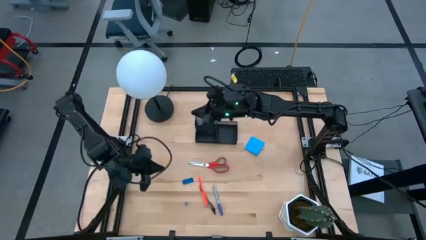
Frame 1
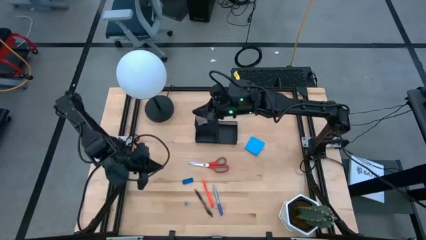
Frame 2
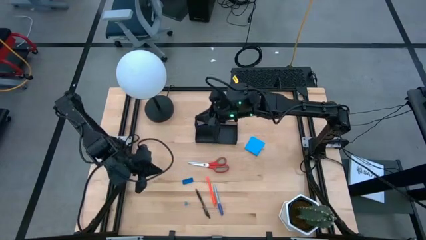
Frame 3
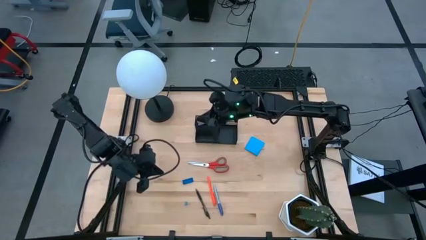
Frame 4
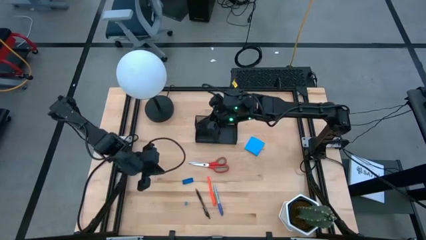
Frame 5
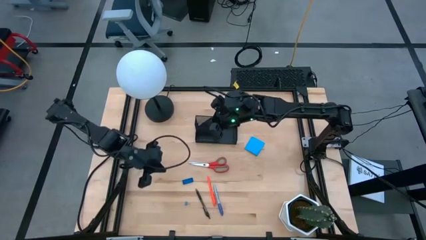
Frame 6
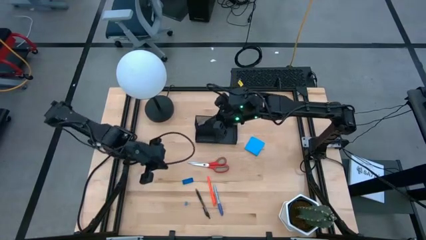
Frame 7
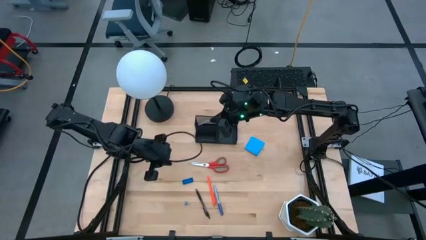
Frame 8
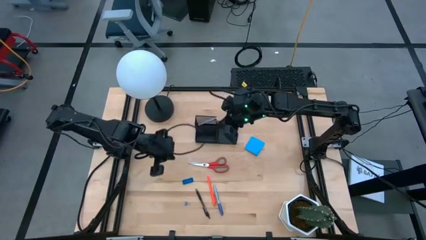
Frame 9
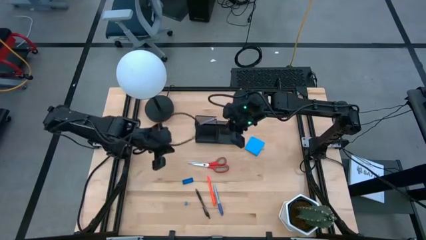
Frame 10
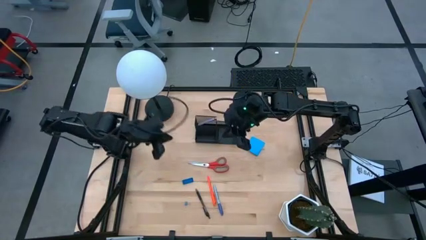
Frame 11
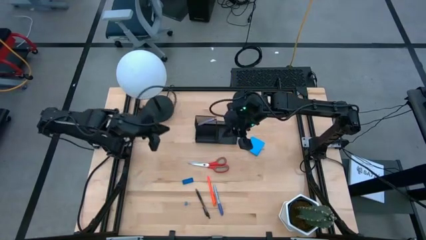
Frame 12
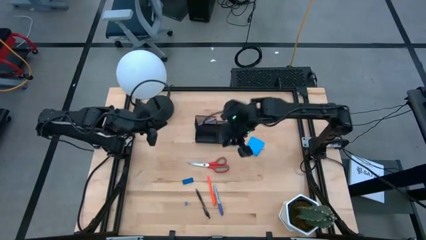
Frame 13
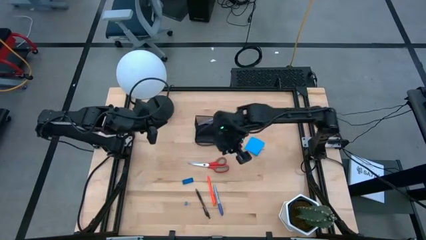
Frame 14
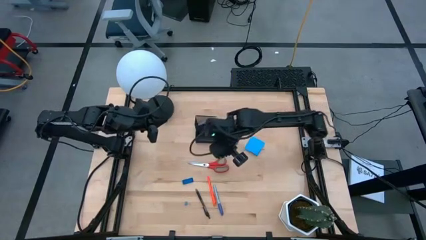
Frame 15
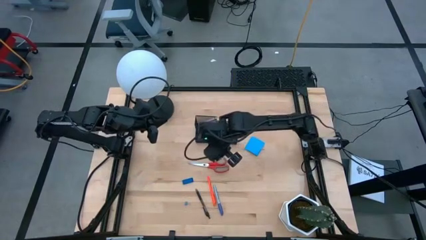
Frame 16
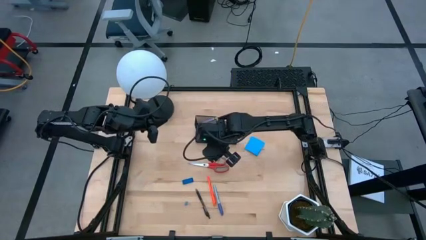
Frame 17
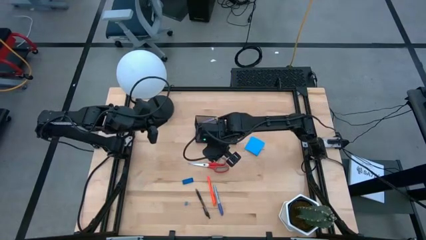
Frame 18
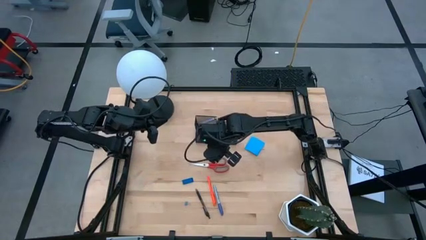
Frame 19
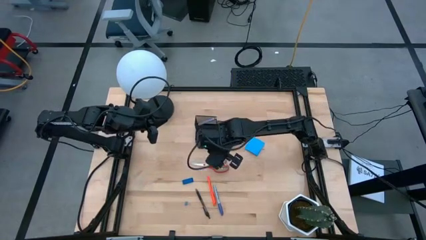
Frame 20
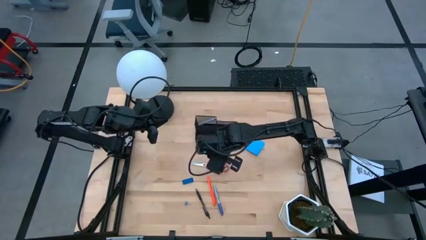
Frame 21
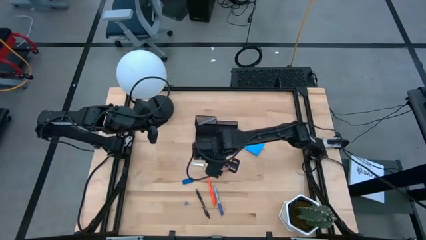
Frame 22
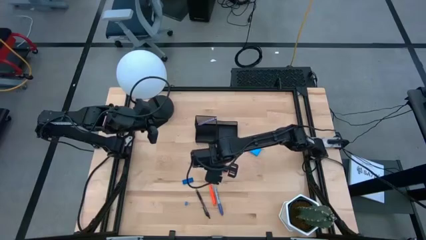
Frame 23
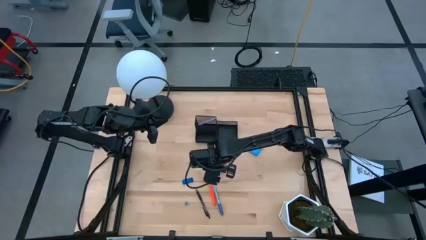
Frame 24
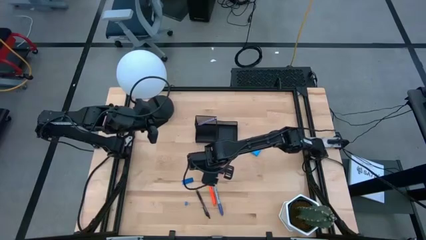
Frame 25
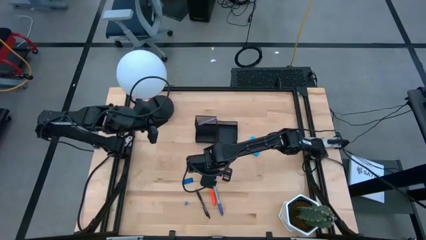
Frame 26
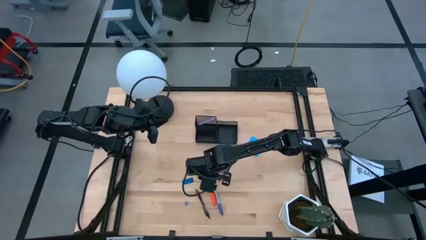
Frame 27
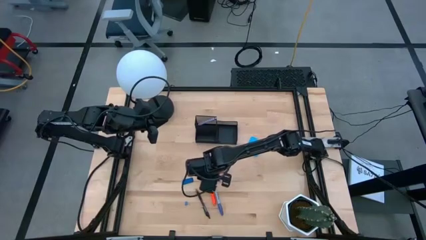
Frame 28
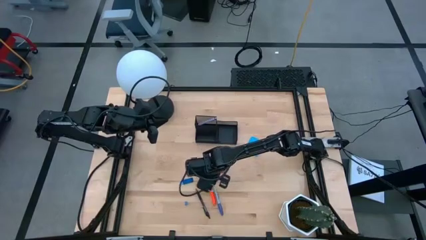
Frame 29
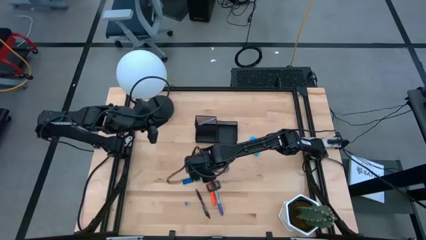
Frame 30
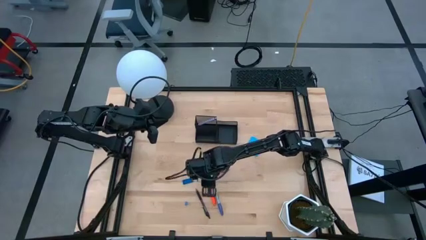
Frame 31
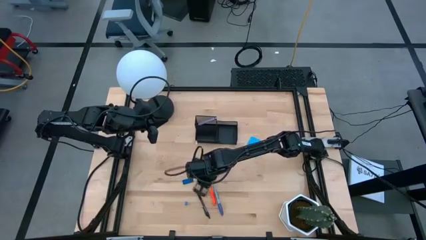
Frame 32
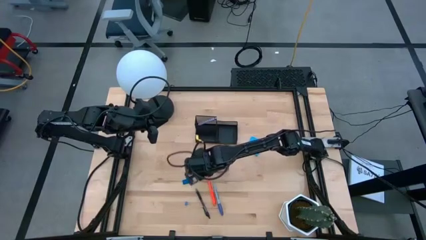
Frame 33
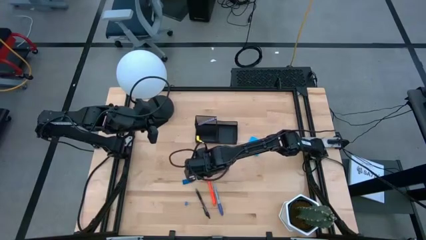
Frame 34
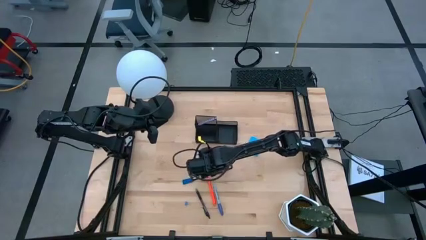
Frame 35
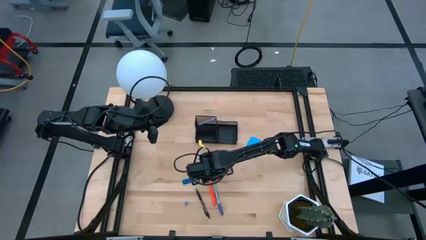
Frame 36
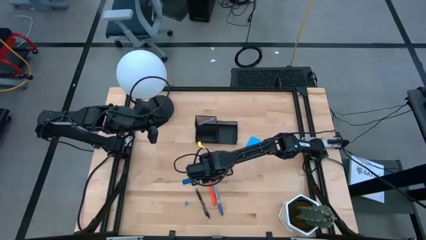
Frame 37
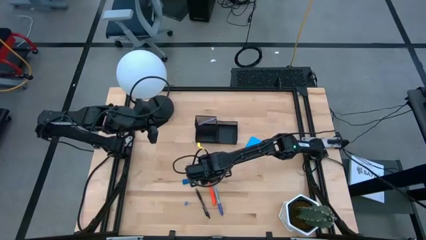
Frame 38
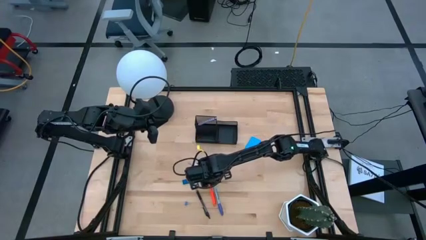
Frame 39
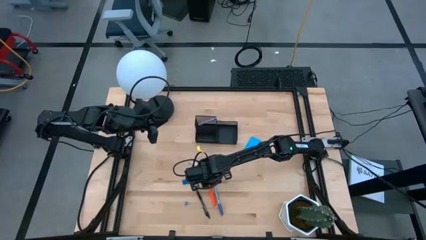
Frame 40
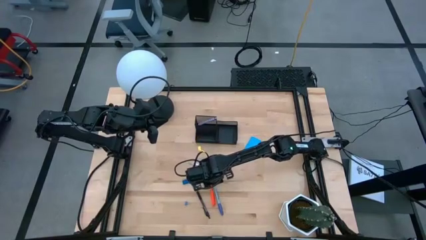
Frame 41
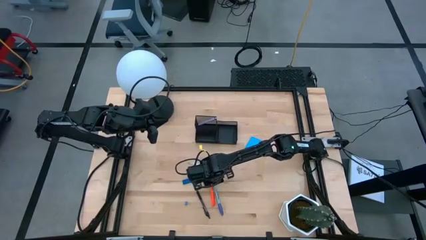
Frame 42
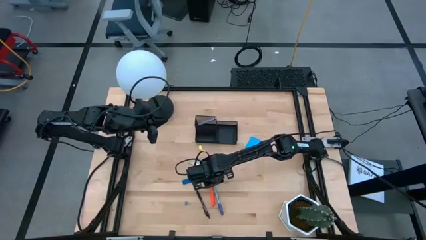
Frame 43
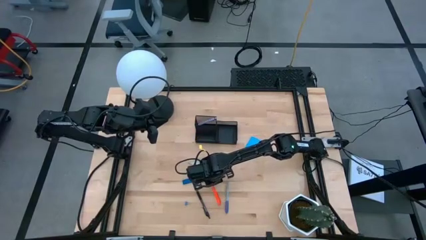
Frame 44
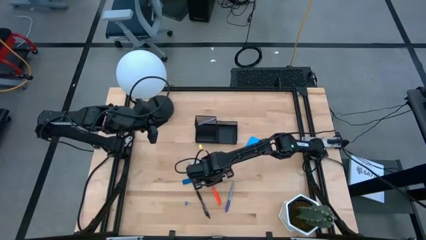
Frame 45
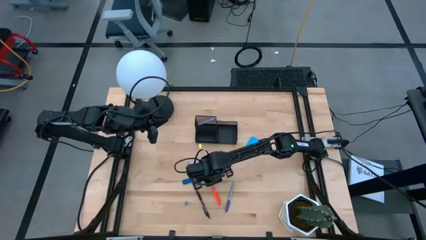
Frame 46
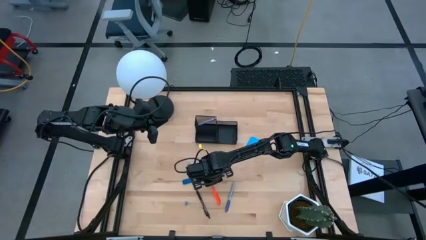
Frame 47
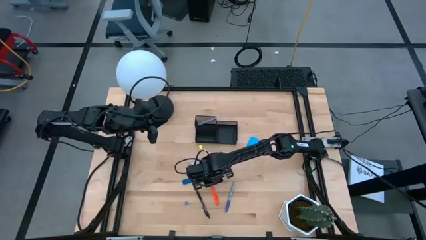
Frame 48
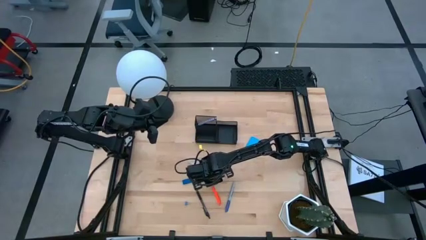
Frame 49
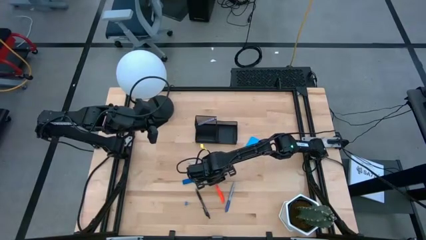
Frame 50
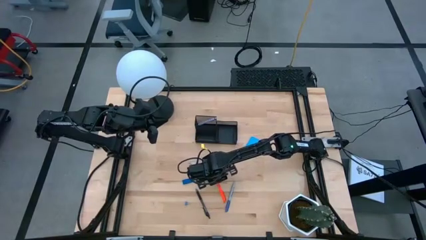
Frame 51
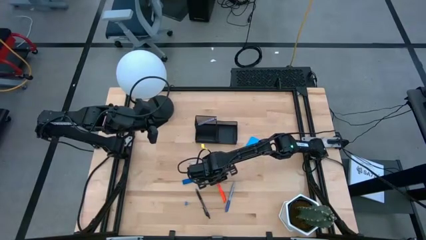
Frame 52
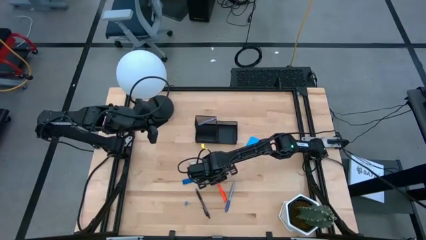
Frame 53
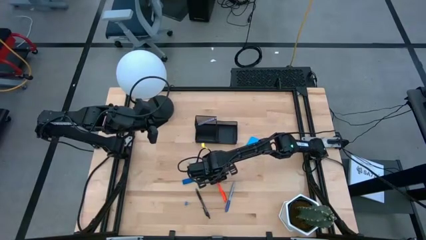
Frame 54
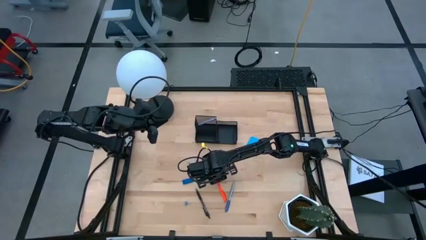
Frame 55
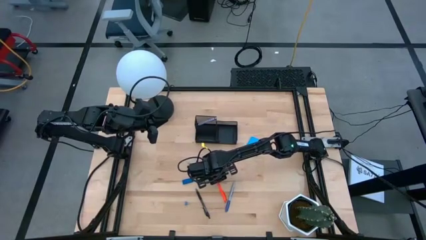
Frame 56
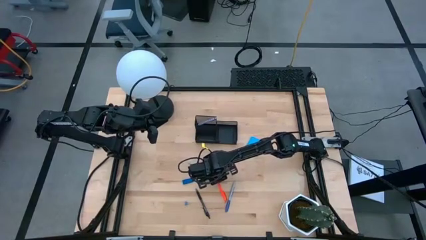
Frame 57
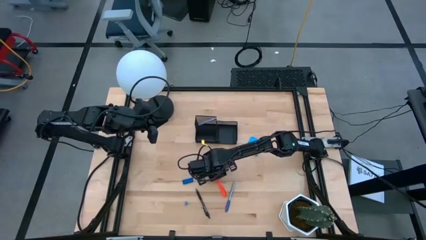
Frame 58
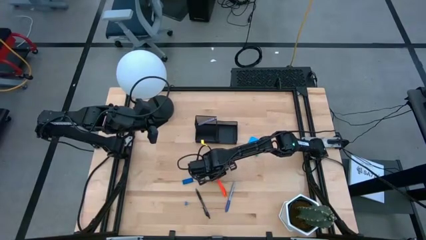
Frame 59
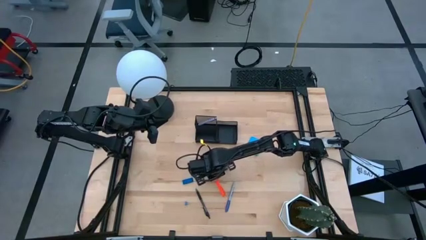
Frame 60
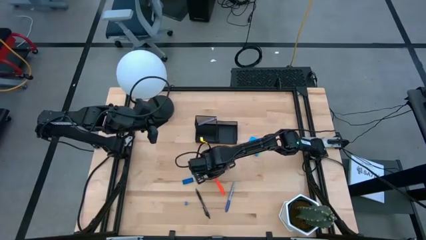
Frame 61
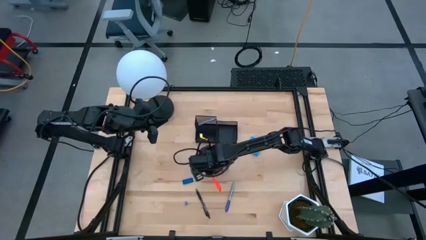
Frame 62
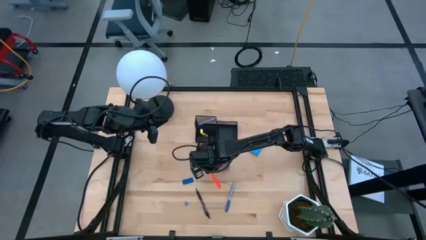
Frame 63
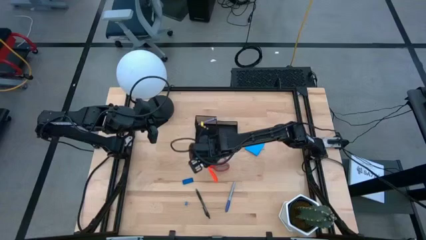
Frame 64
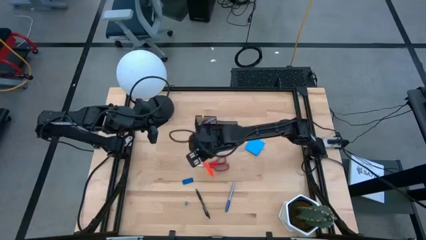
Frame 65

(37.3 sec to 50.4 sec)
Task: Pick and place office supplies into organizer
Put the orange pen into the black desk organizer

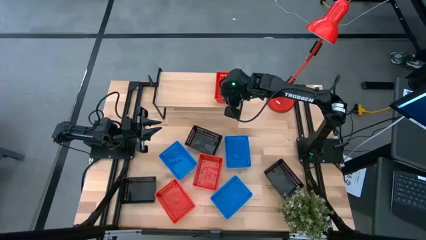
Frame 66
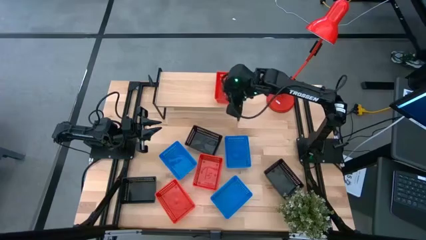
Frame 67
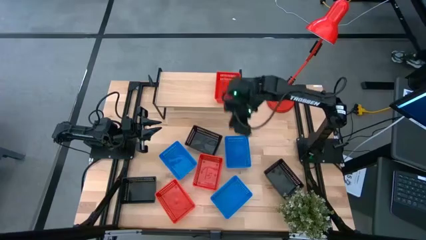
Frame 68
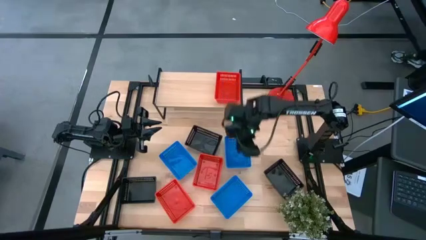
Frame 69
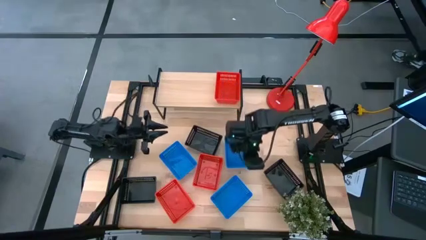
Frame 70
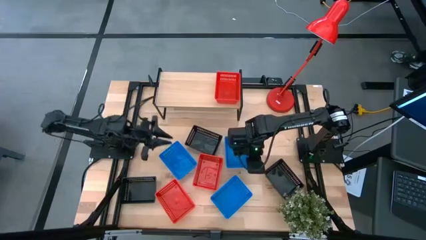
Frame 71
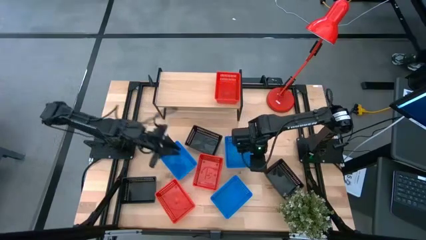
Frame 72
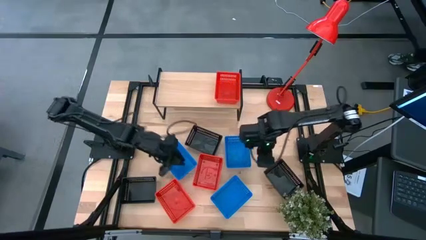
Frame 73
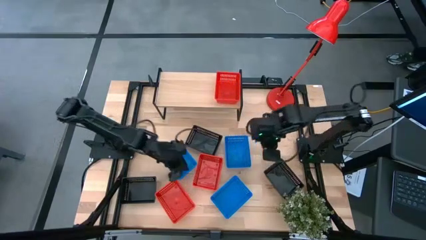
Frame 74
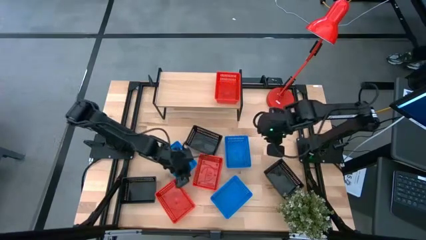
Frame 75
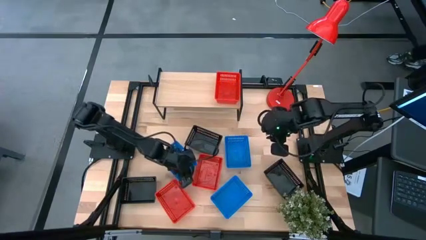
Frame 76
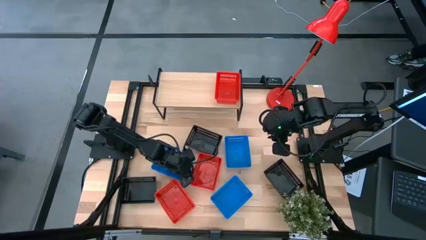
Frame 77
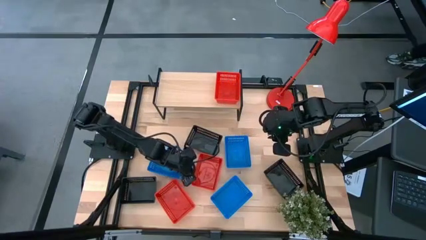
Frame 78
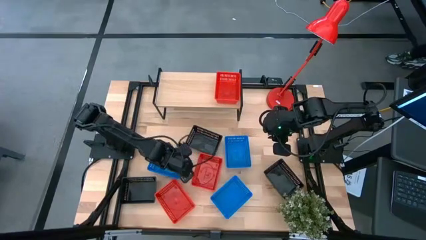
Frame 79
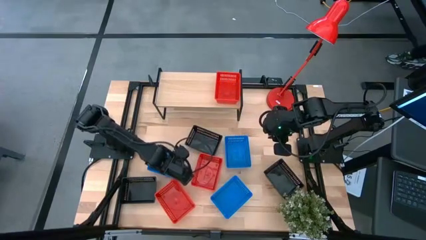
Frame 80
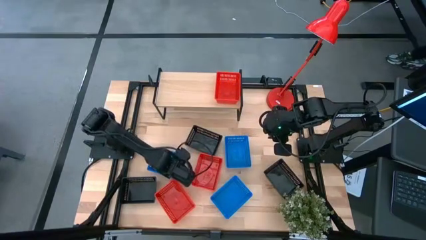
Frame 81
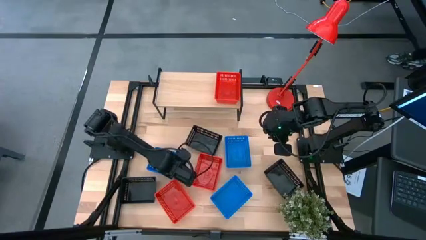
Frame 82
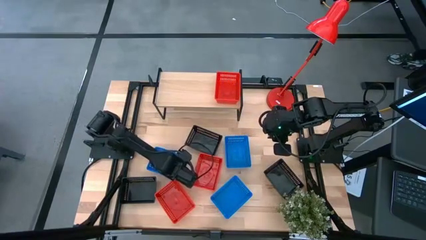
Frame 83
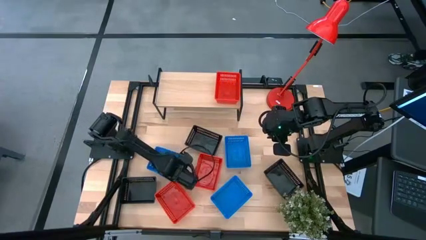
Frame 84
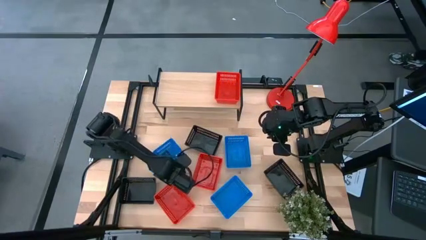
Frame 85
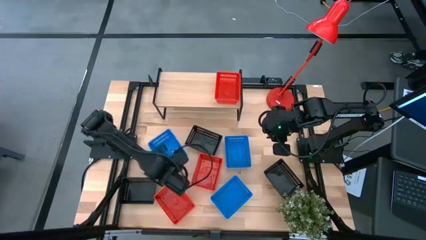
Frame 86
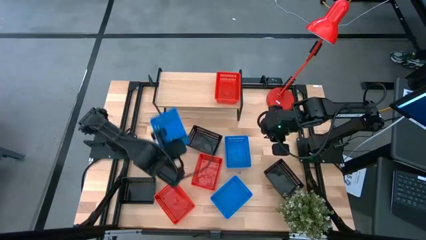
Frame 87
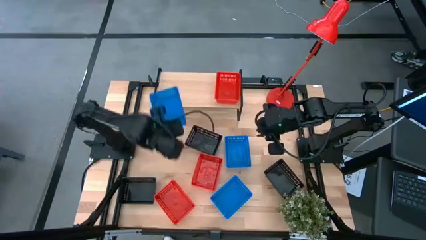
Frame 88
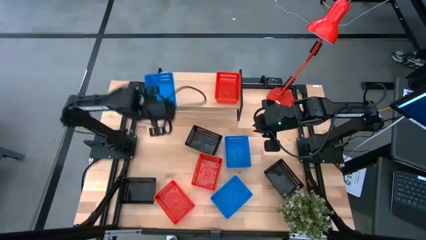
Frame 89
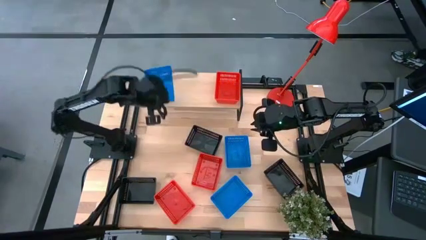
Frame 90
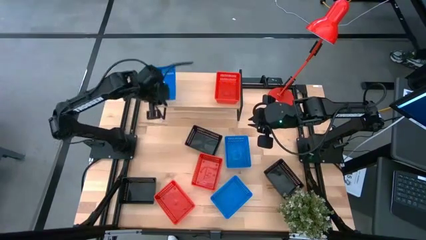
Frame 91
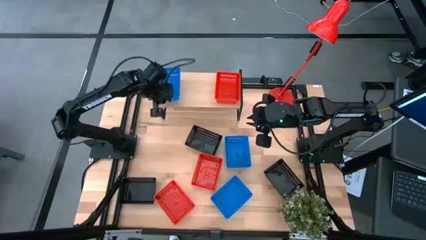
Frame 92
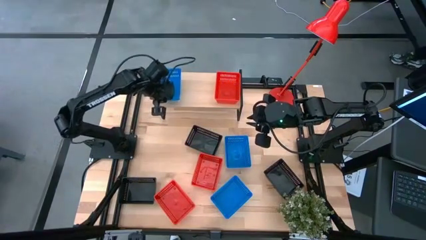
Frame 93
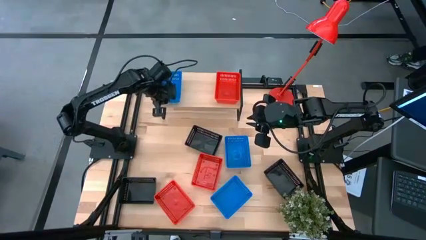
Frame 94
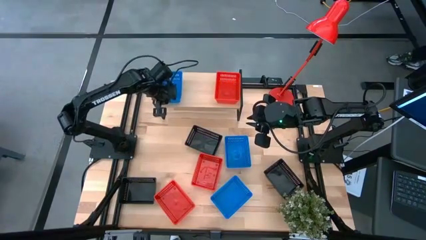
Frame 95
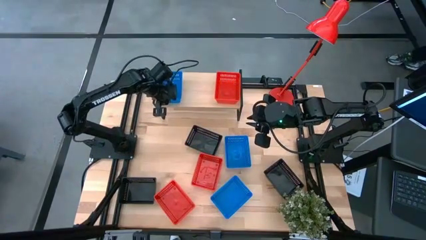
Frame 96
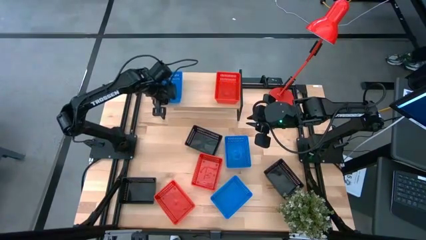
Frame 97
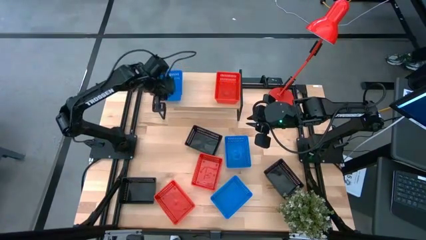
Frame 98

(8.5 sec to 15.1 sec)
Task: Stack baskets on shelf by color
Put the top left blue bin on the shelf
